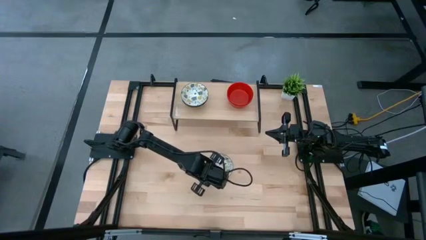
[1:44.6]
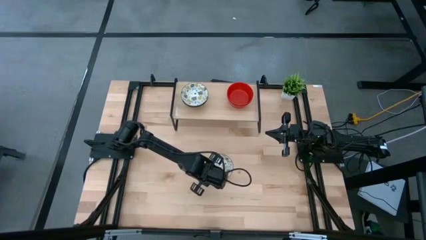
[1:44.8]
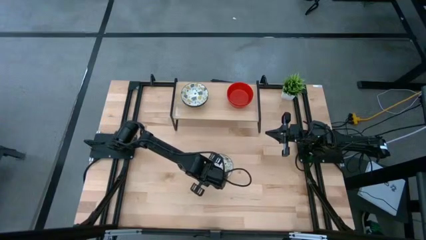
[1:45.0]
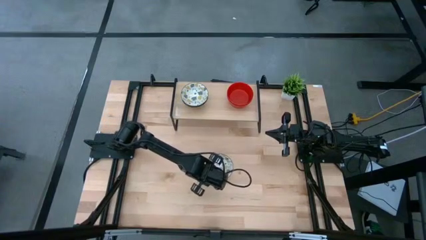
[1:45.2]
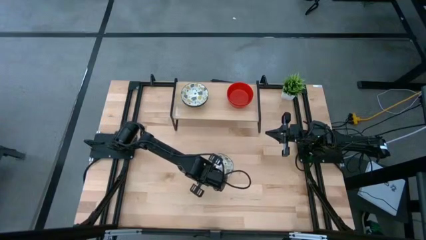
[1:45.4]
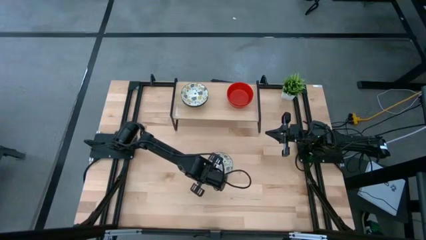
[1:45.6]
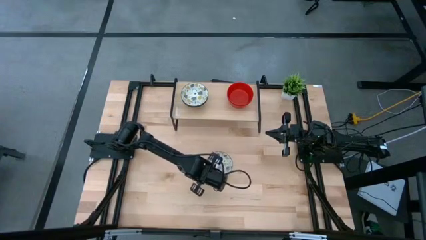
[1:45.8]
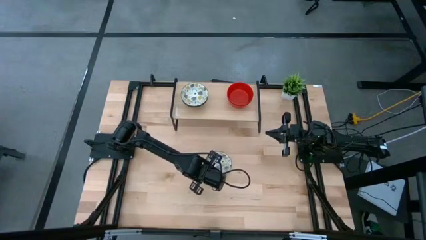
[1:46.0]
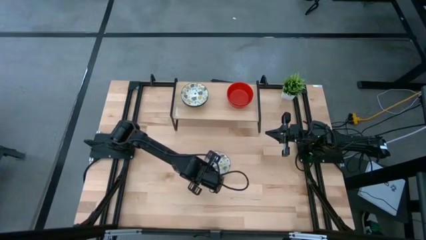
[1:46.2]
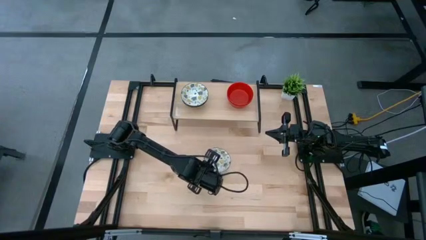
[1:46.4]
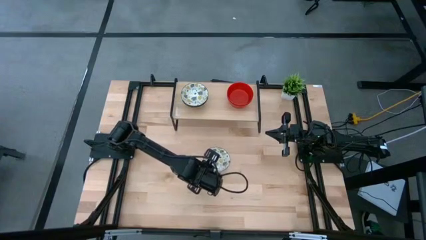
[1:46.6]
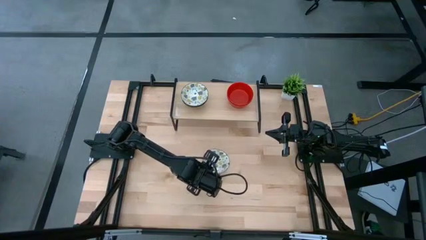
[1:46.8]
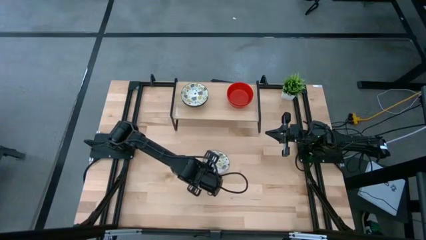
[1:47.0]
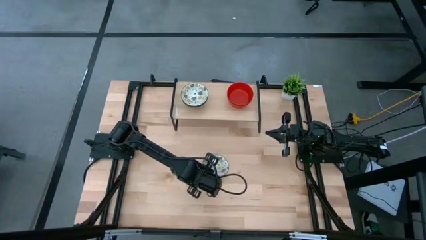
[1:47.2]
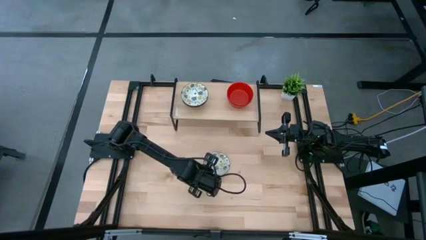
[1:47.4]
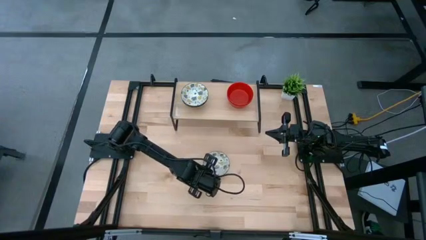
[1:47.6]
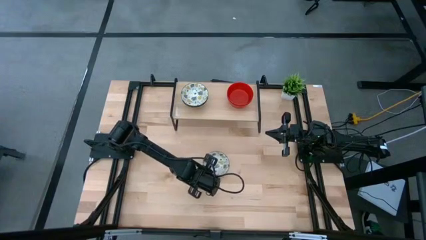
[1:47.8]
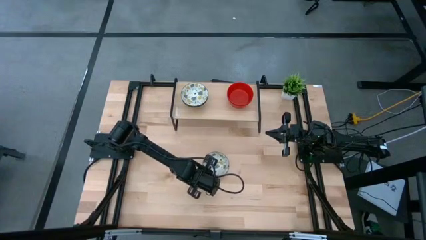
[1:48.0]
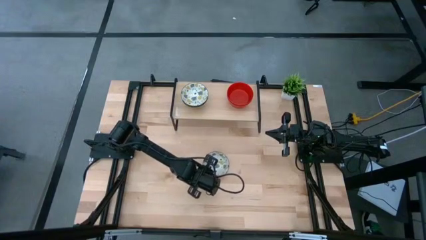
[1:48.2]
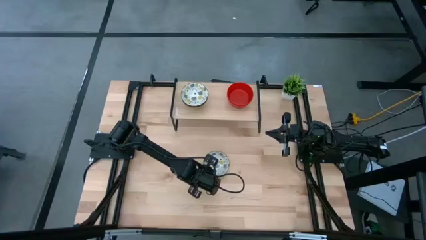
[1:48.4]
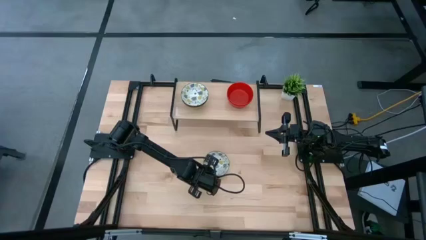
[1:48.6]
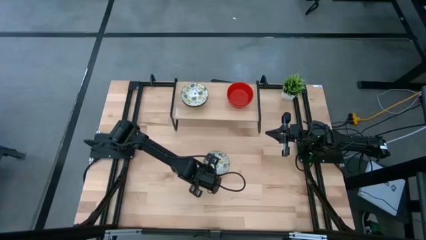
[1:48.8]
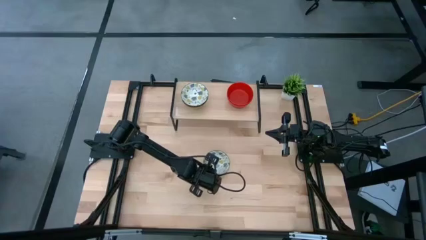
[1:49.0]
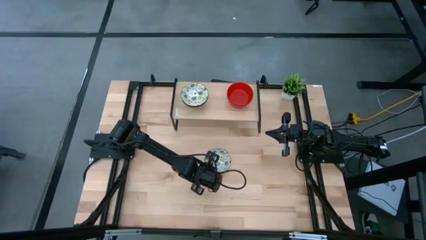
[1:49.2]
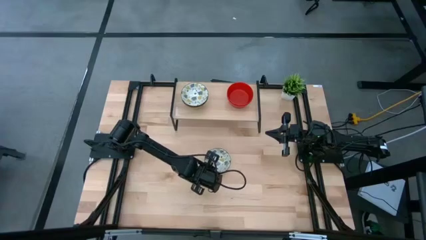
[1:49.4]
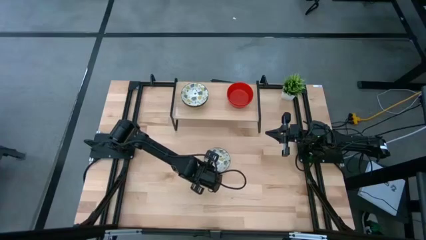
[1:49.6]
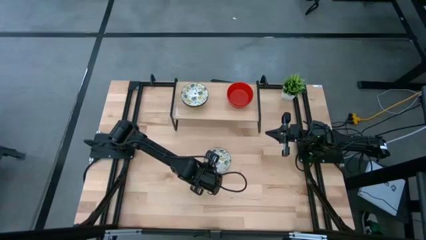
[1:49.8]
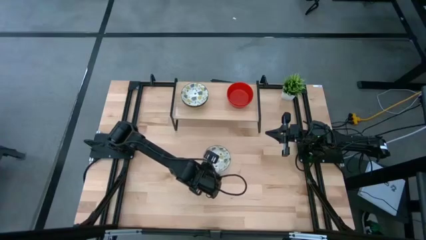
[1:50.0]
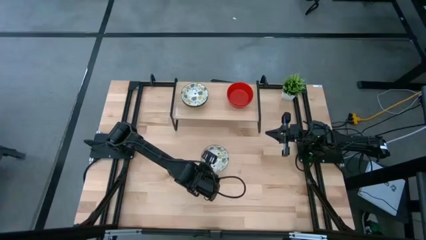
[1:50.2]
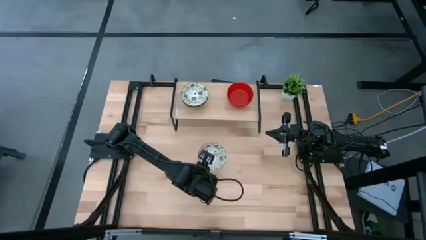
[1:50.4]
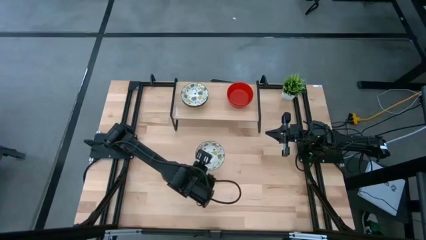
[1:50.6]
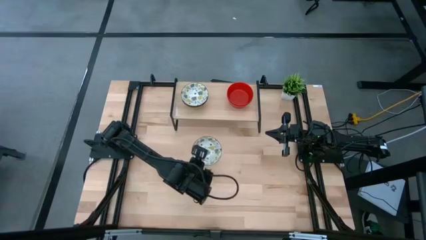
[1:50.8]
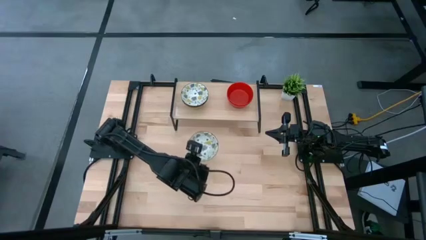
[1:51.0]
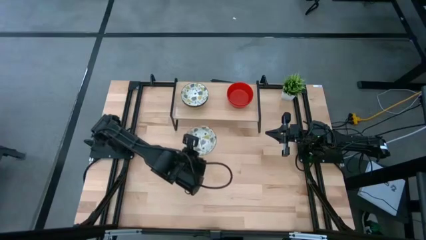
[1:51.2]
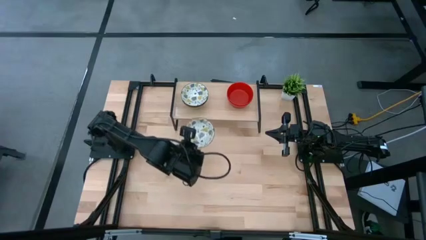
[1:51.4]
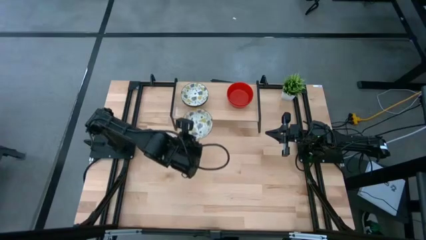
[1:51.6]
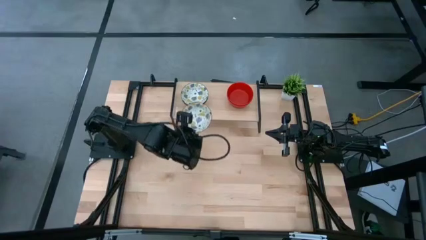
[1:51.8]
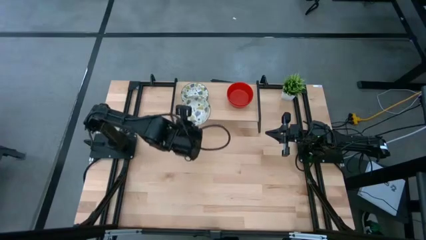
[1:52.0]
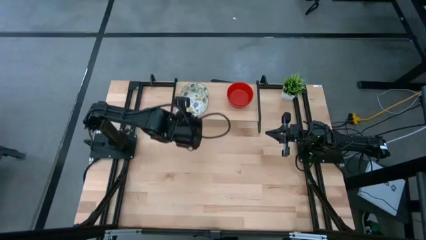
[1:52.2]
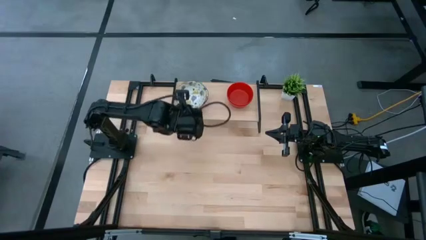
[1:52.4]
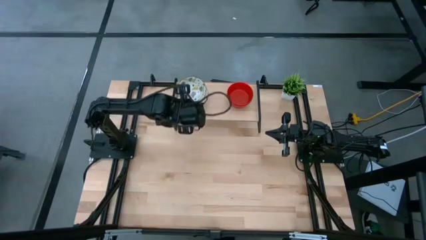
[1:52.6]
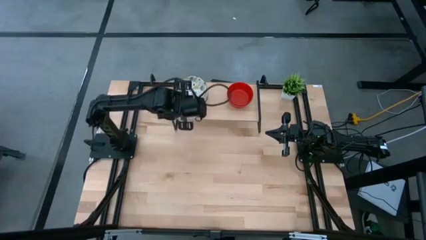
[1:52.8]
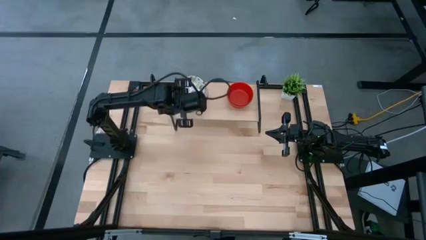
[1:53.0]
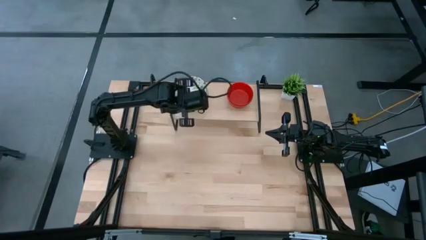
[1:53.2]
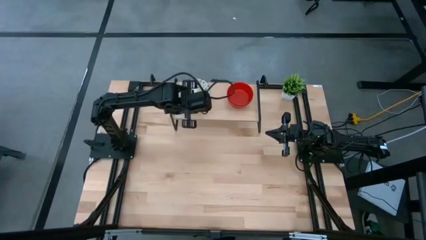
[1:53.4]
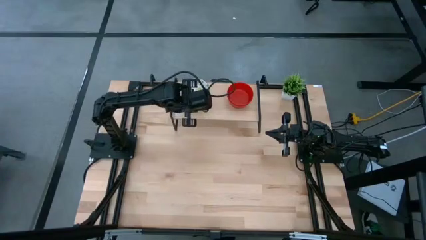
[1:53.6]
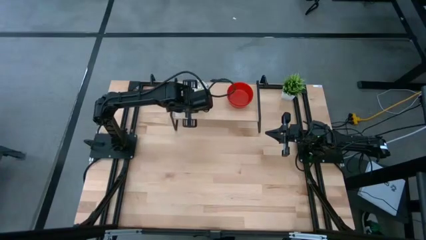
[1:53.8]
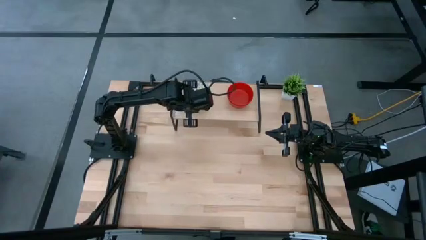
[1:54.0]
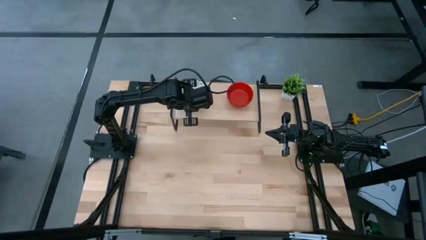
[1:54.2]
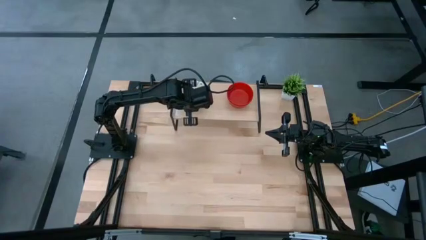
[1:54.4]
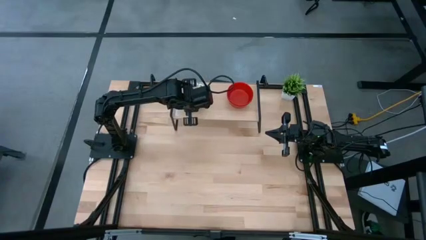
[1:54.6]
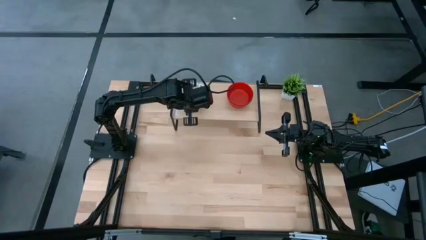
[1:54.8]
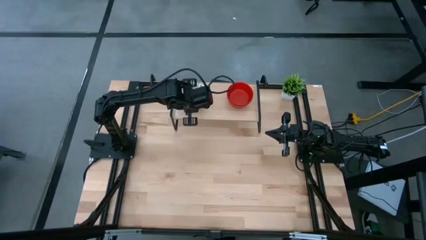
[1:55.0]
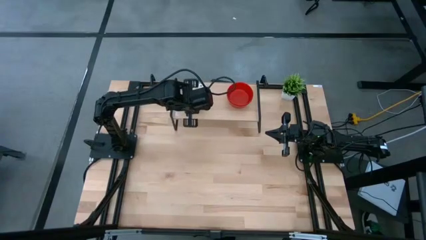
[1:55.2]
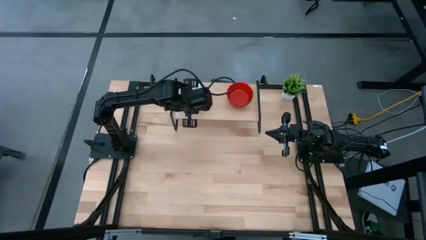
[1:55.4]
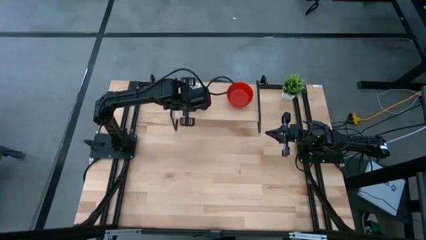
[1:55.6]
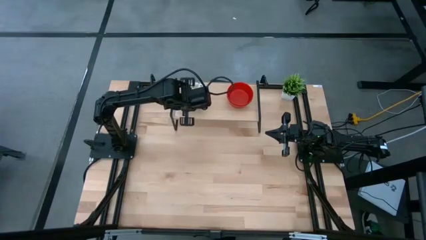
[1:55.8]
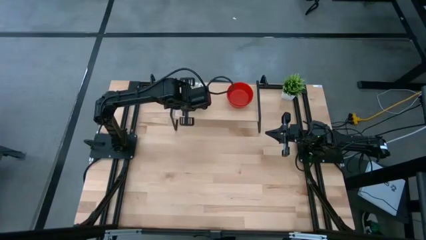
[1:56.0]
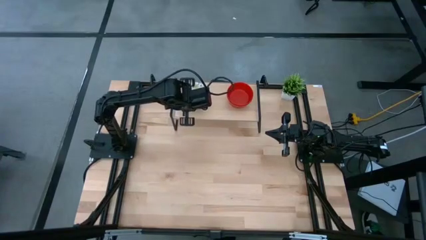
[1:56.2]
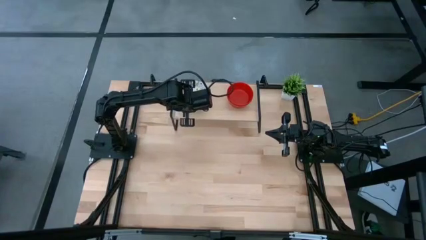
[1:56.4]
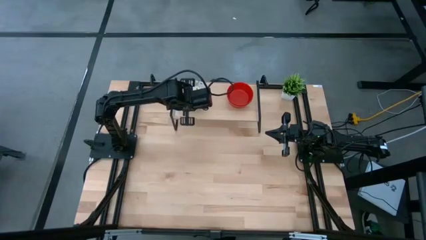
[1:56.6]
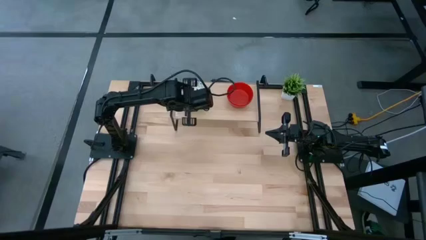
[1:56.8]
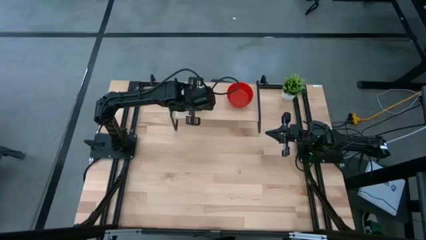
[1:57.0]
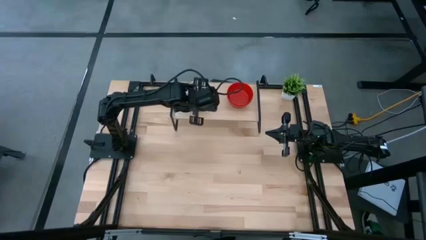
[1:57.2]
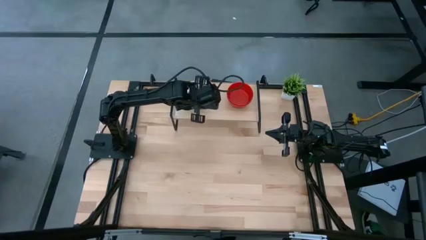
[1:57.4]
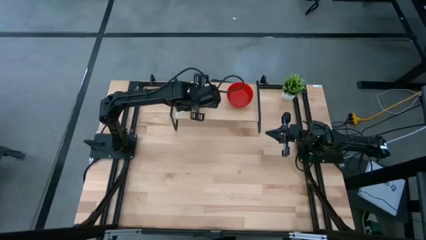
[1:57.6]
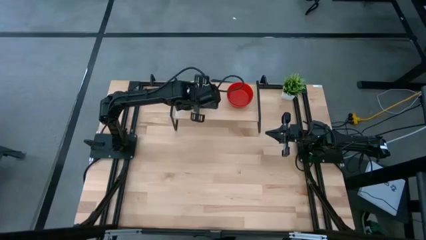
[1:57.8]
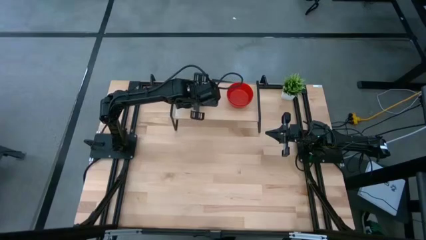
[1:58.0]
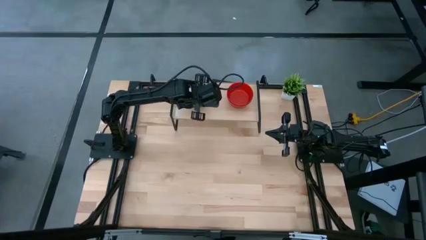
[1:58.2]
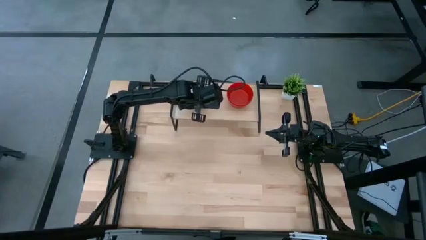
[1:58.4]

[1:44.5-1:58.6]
Task: Pick & Place Mini bowls
Stack the white patterned bowl on top of the white patterned bowls on the shelf

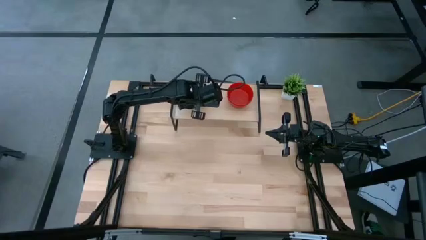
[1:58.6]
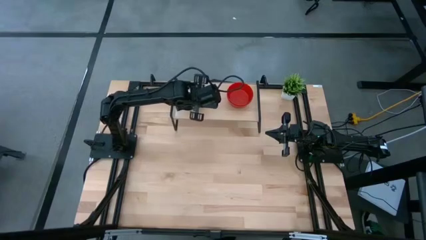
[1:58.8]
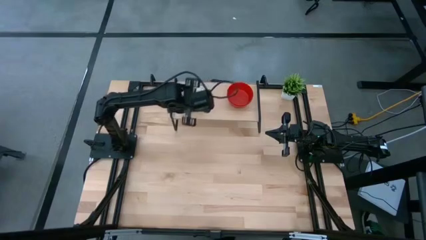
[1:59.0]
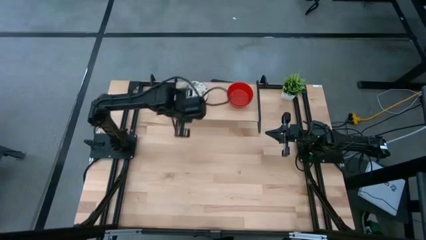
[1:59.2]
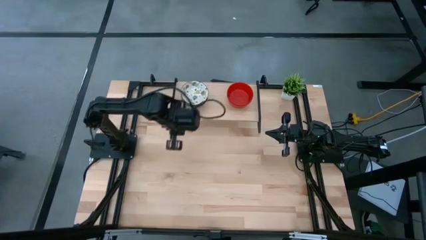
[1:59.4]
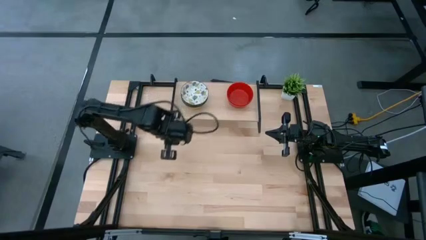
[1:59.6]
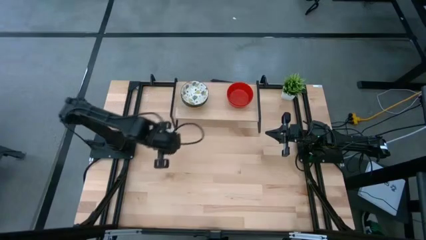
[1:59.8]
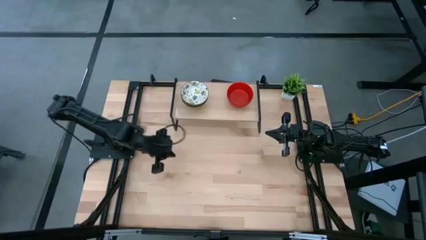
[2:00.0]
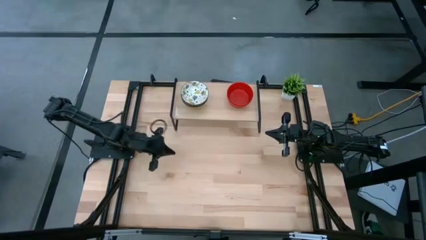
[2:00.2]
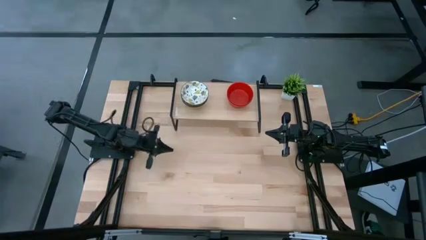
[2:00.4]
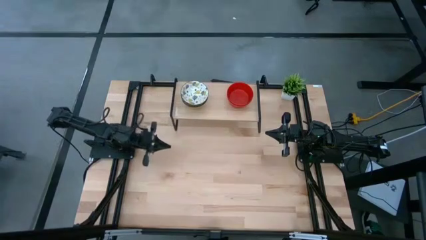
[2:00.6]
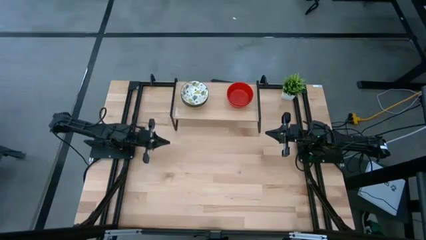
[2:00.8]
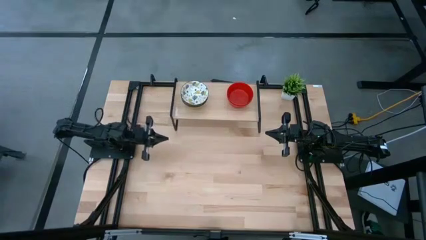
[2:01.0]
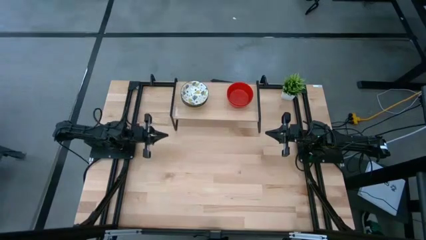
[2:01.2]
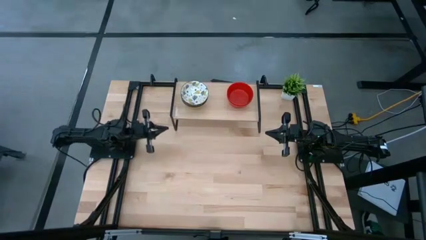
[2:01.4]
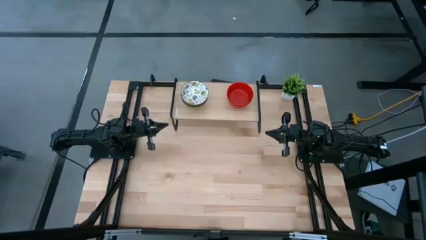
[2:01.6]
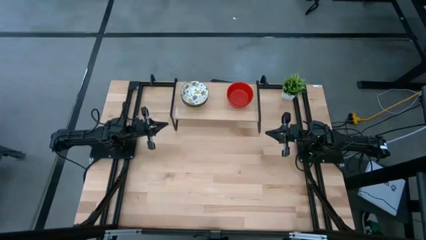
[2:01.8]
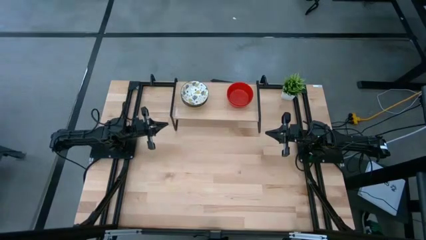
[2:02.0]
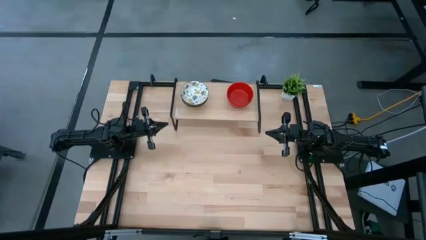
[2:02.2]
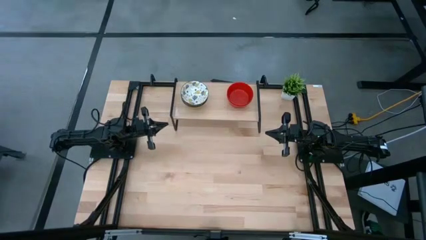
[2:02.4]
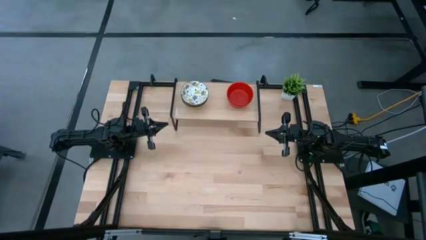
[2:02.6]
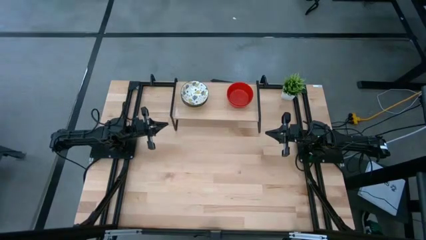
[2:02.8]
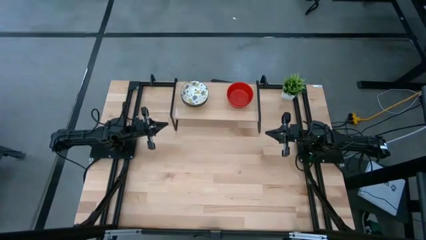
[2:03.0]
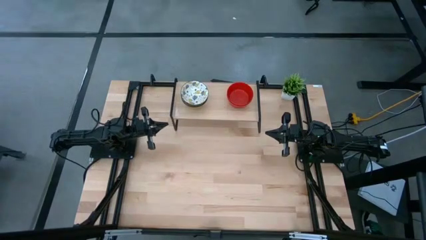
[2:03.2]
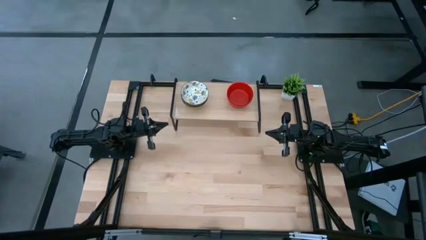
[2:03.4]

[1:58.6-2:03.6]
Return to Home Position
